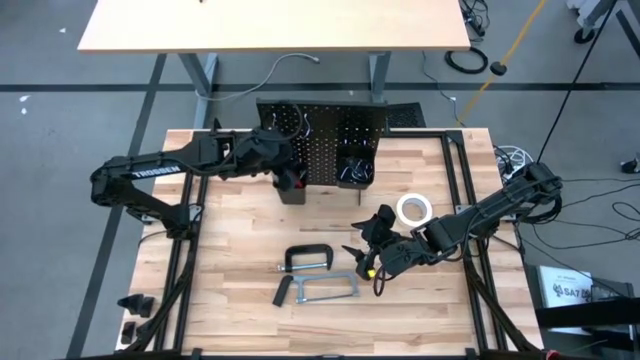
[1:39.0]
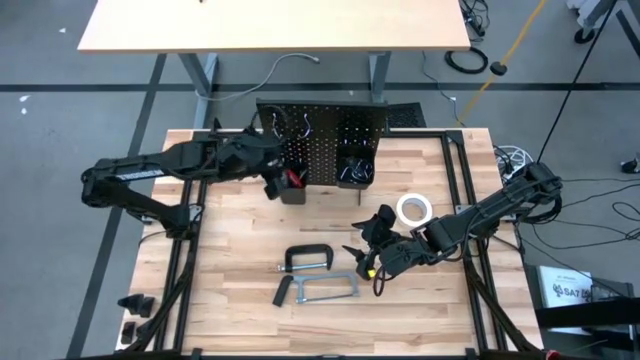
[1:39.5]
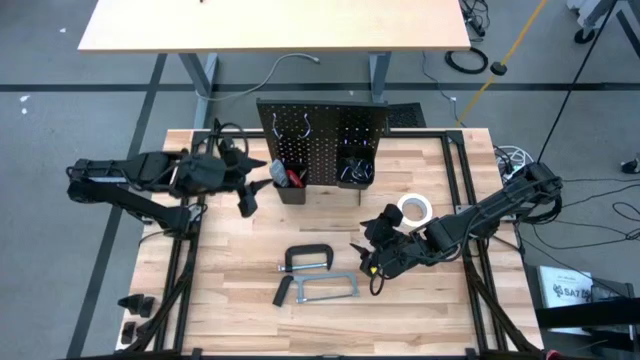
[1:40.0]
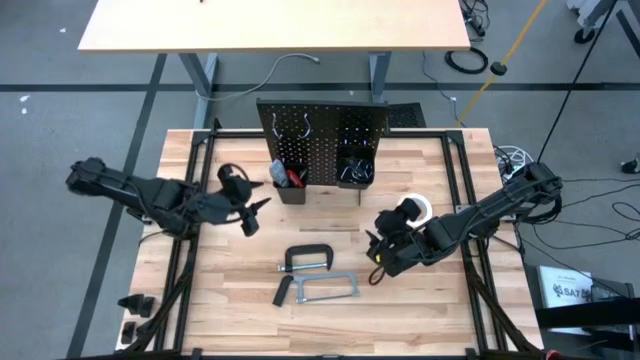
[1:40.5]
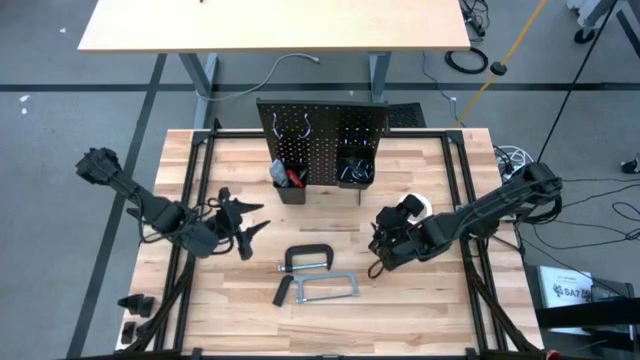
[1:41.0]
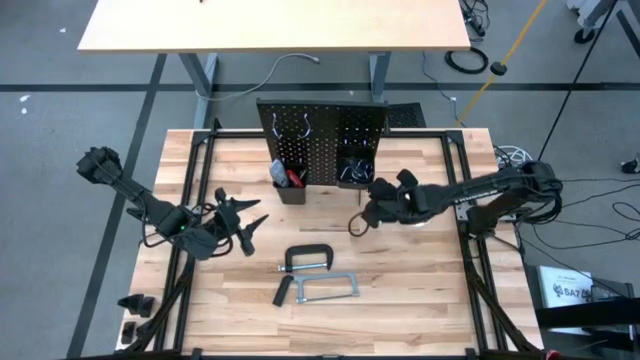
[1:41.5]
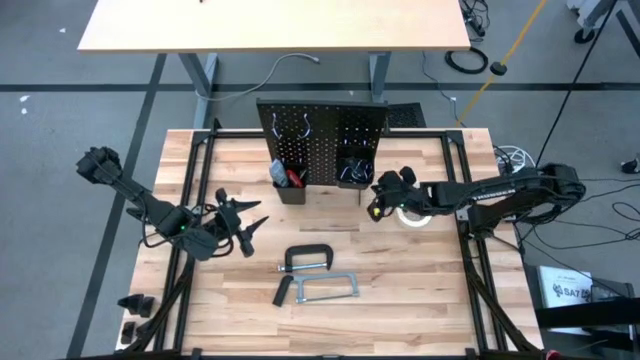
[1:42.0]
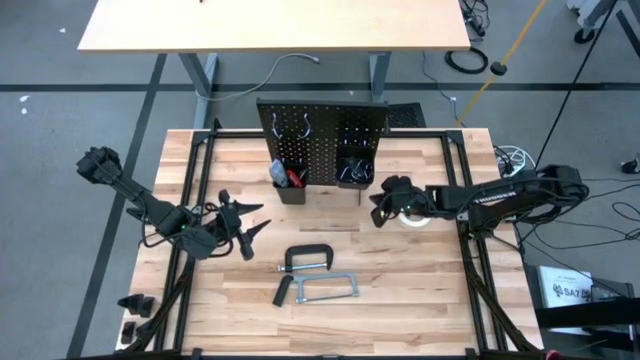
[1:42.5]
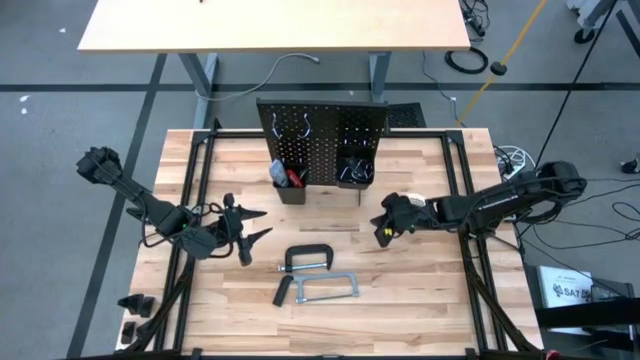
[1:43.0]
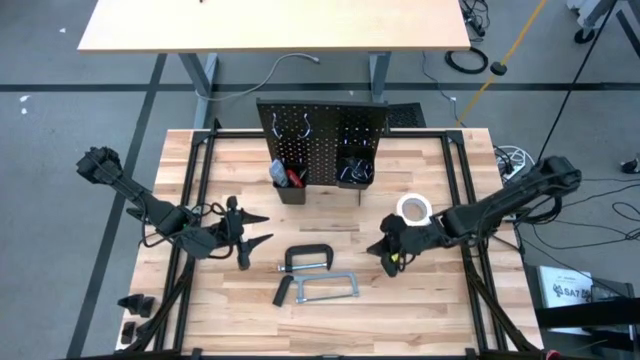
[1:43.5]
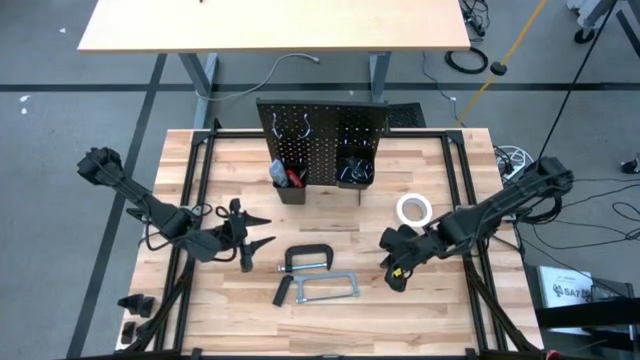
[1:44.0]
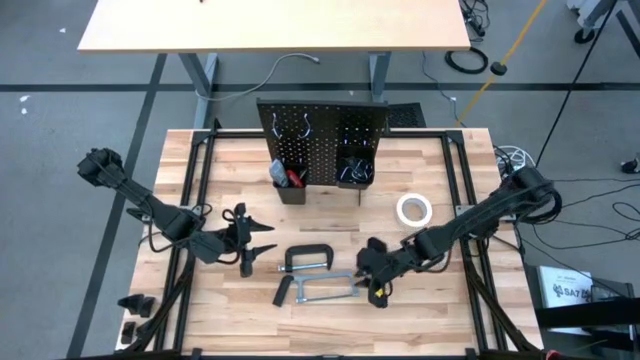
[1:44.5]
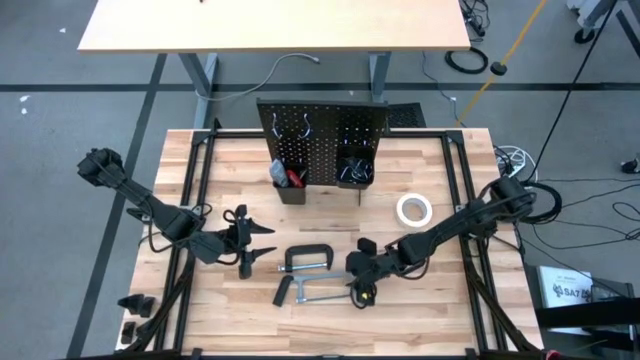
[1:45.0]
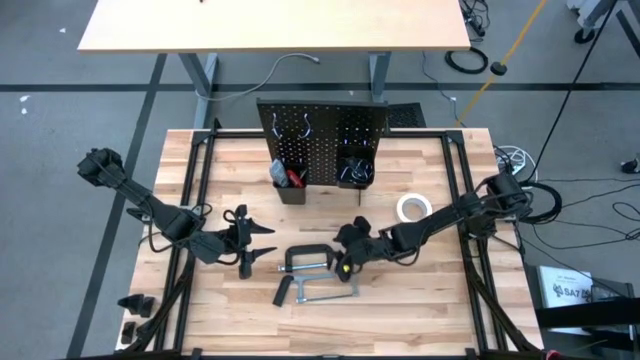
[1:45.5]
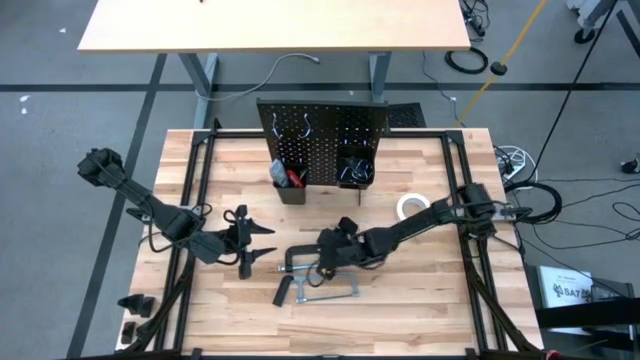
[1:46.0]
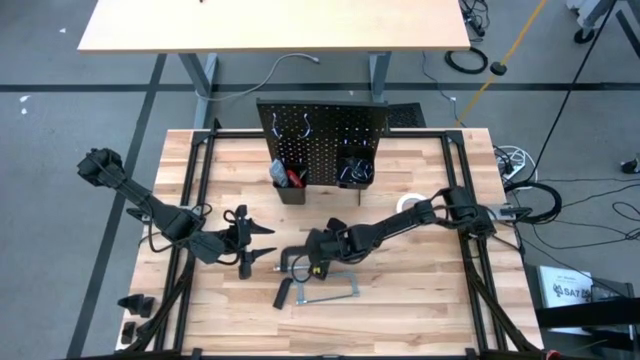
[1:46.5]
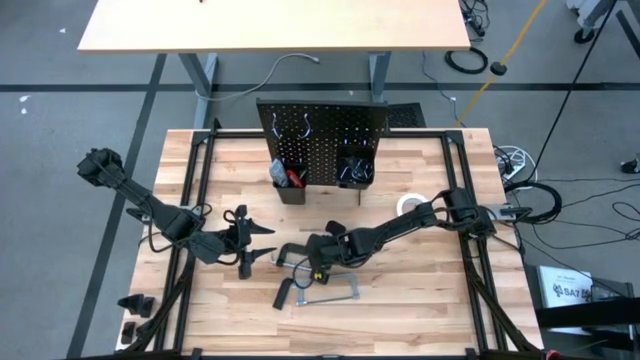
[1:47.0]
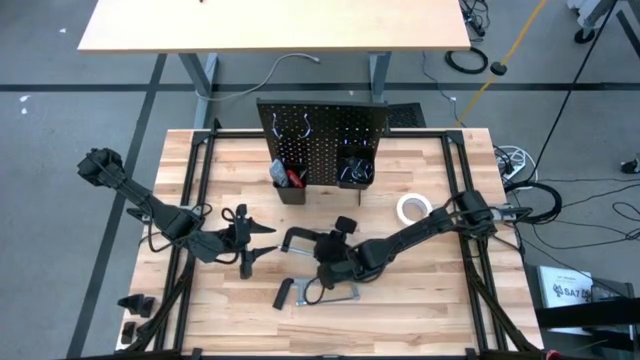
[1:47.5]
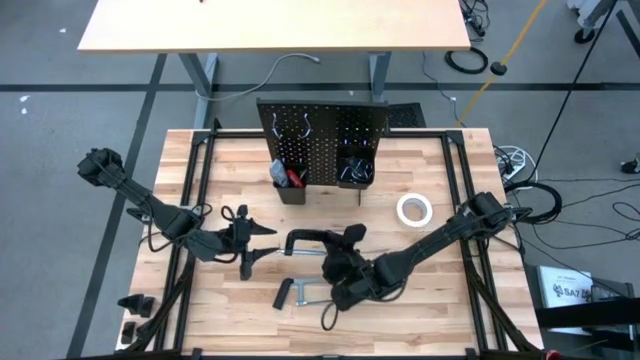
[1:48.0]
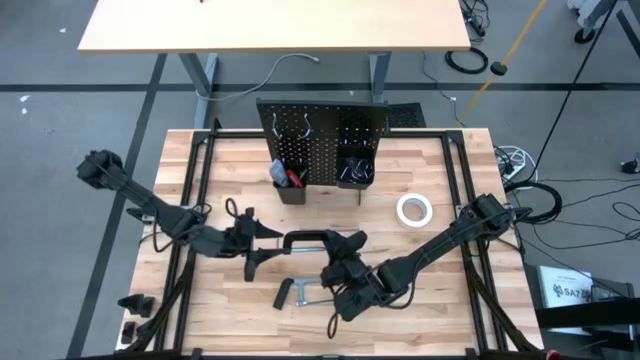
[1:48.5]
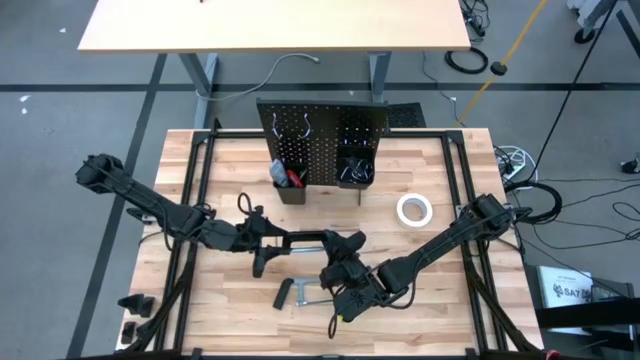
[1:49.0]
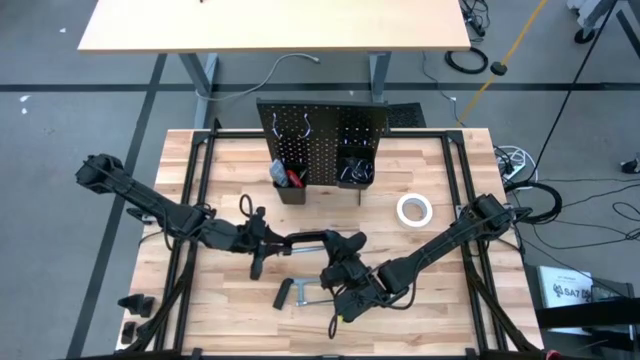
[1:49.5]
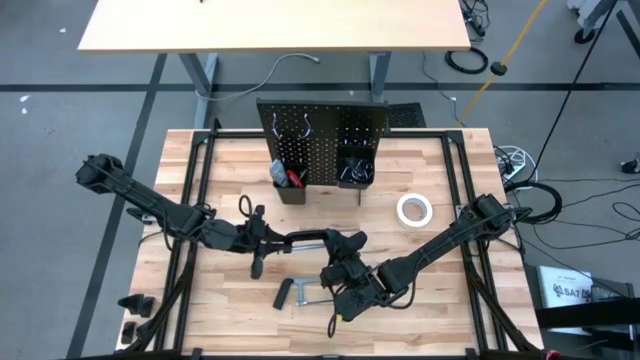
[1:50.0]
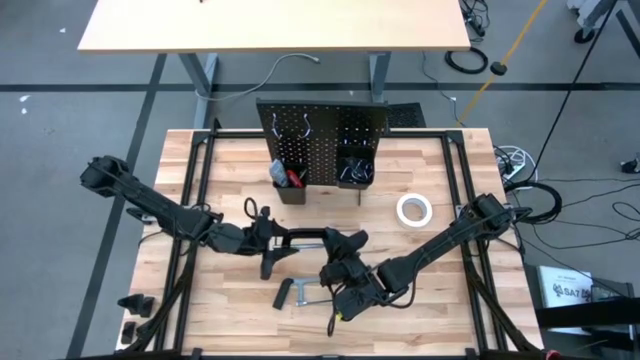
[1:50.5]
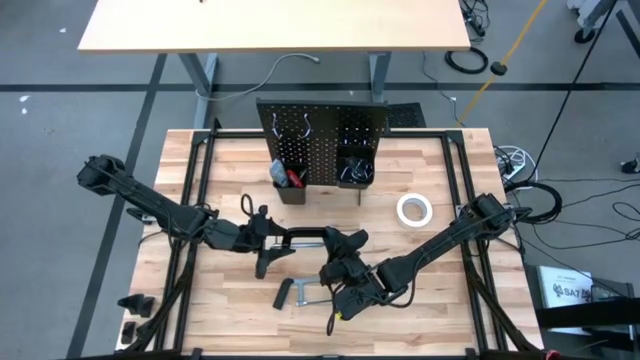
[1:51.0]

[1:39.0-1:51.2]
Task: Hang tools onto peg board
Hang the black clamp on the peg board

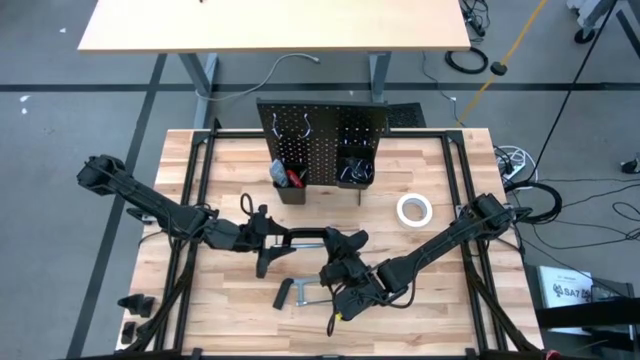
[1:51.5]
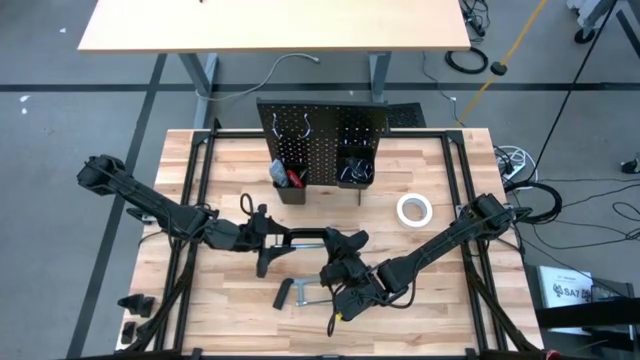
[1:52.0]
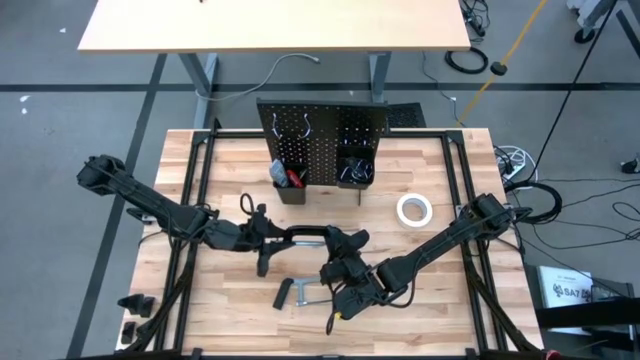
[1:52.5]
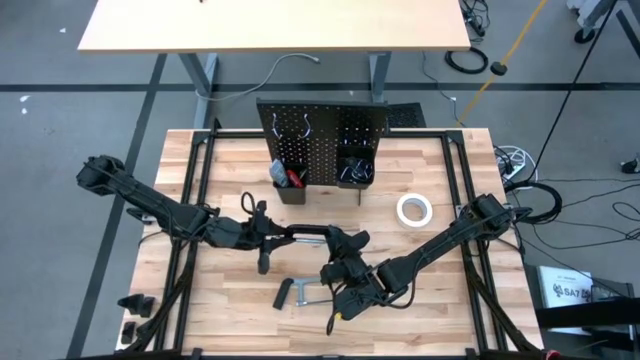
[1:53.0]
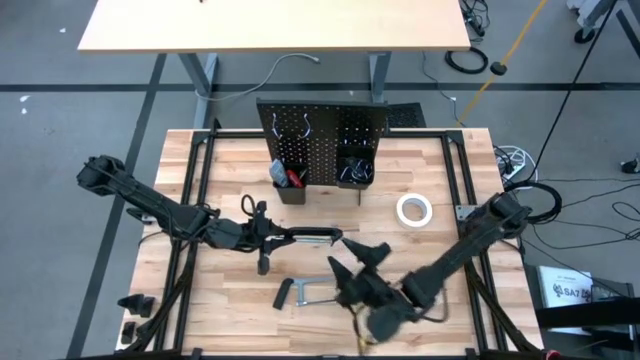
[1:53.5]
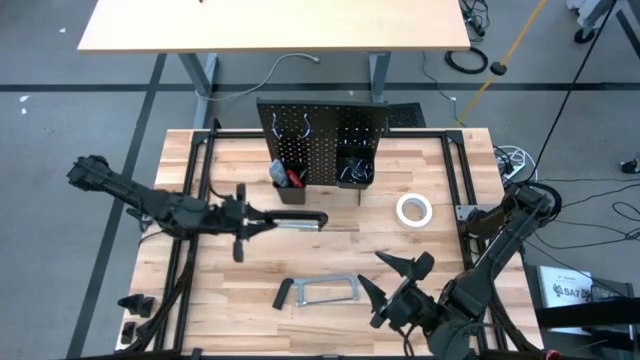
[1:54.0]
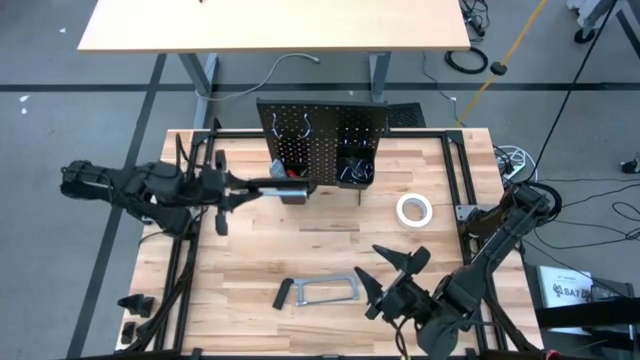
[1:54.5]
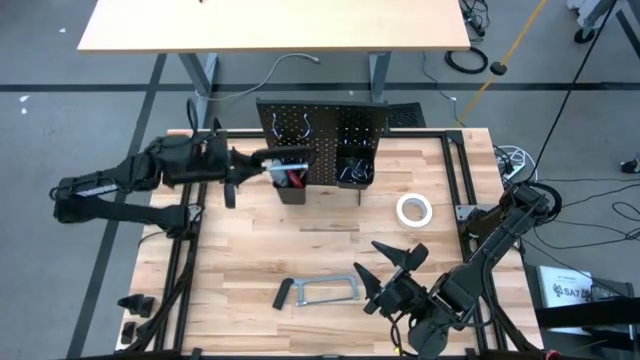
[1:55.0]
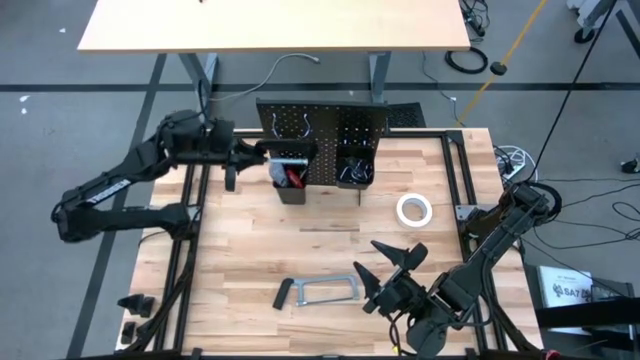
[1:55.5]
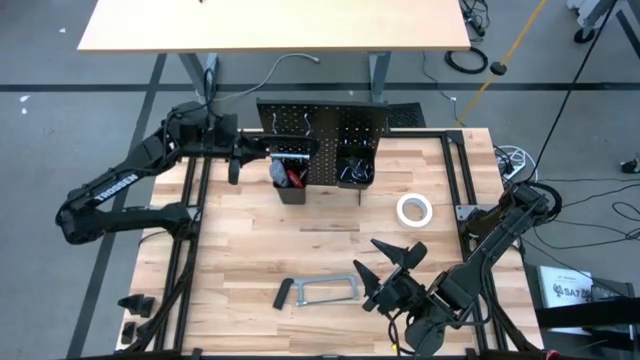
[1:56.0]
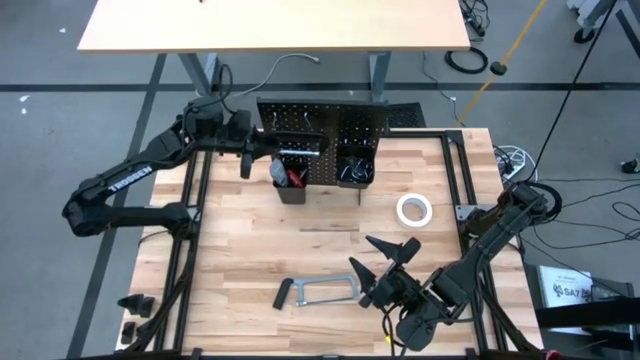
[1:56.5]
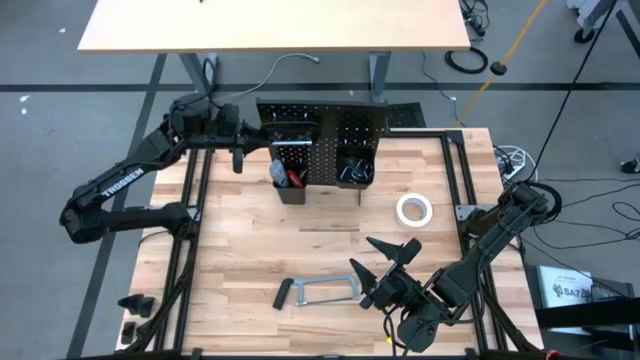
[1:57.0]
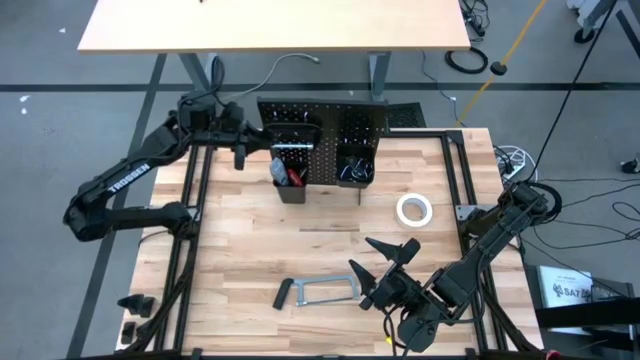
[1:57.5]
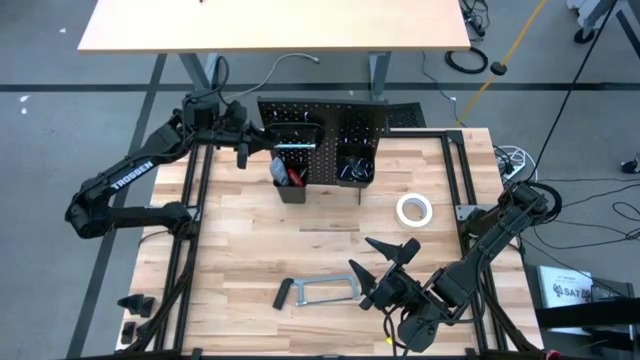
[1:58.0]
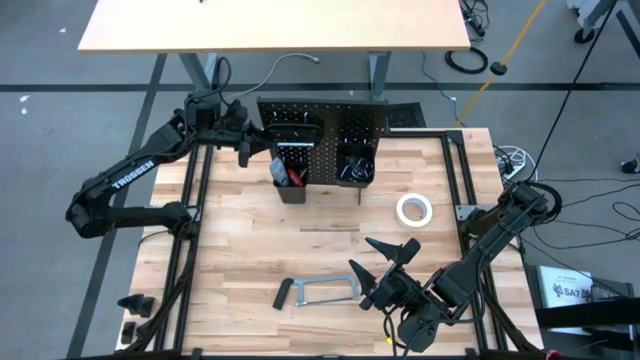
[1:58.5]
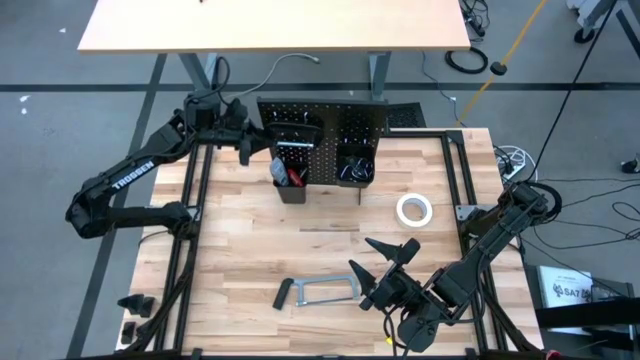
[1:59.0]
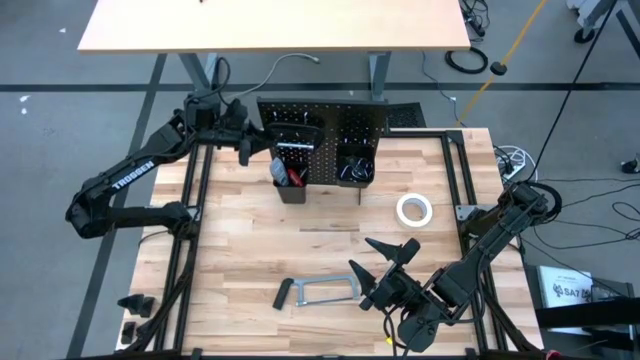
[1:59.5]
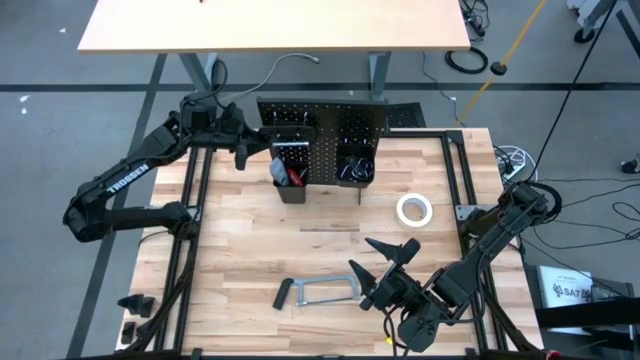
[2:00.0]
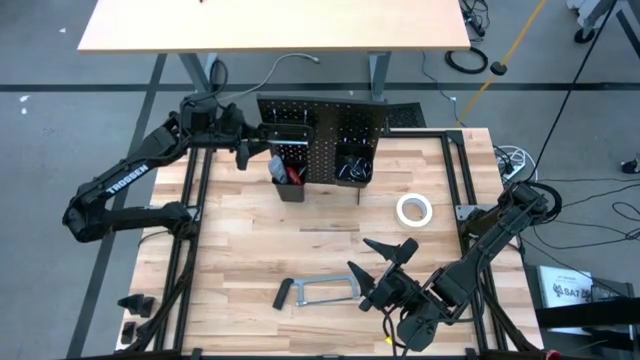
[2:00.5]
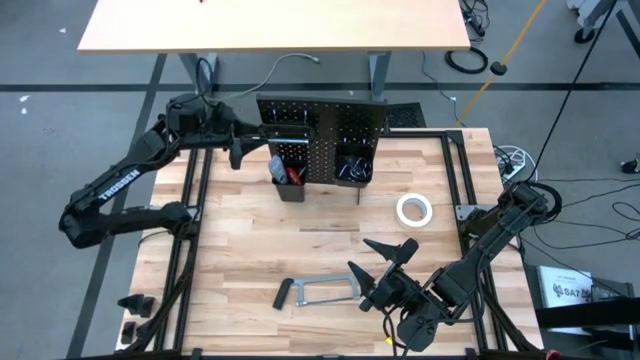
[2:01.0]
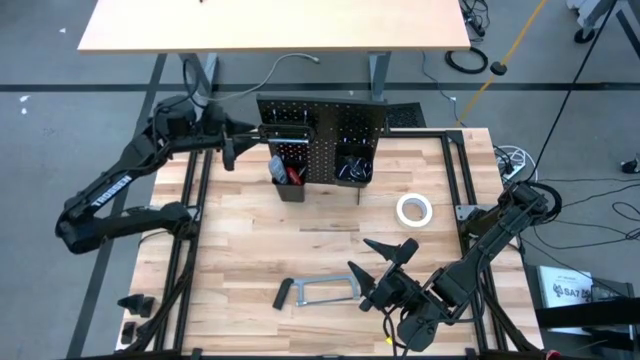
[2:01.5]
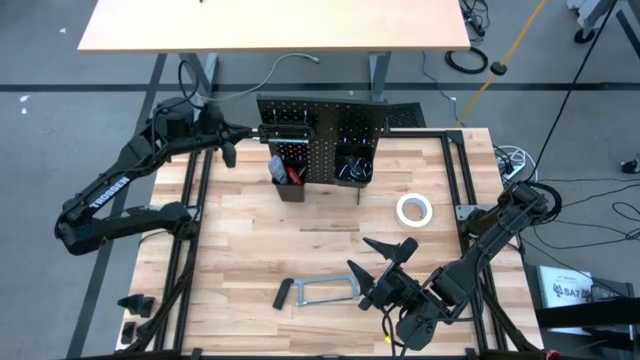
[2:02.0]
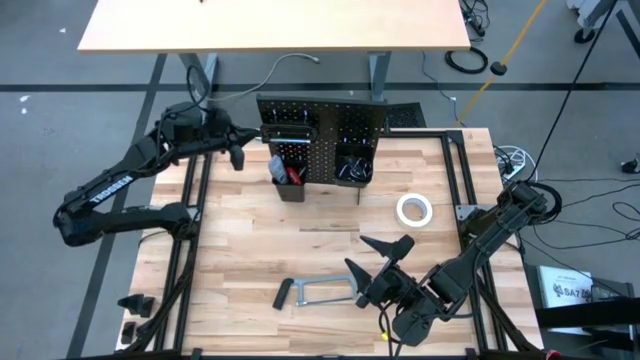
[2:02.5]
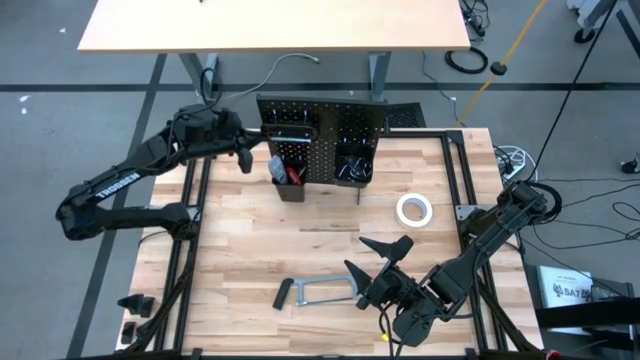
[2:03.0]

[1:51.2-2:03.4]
Hang the black clamp on the peg board
